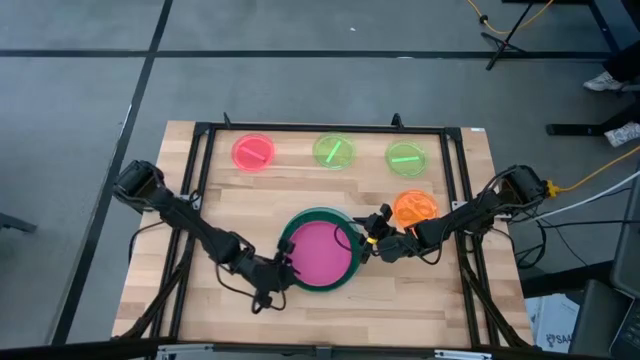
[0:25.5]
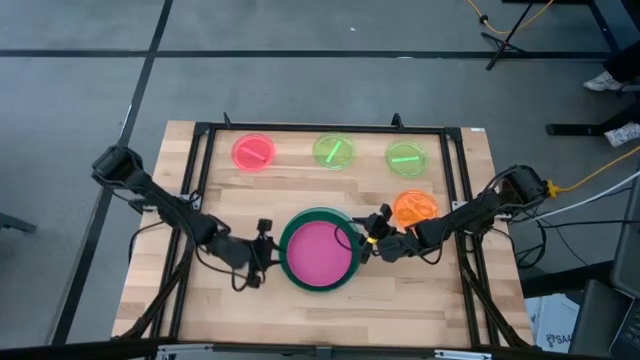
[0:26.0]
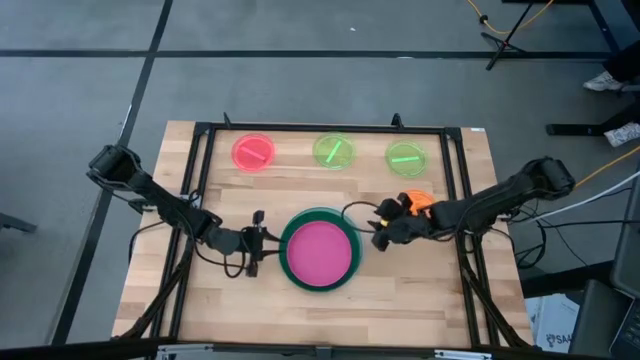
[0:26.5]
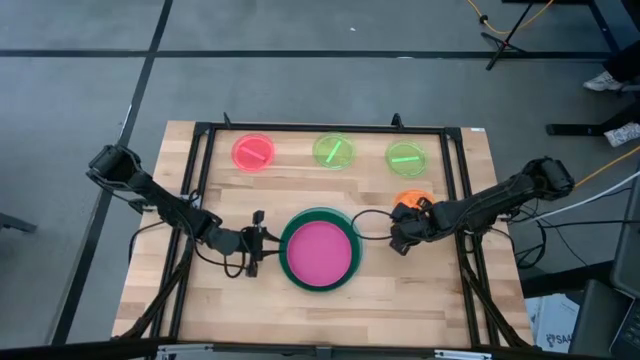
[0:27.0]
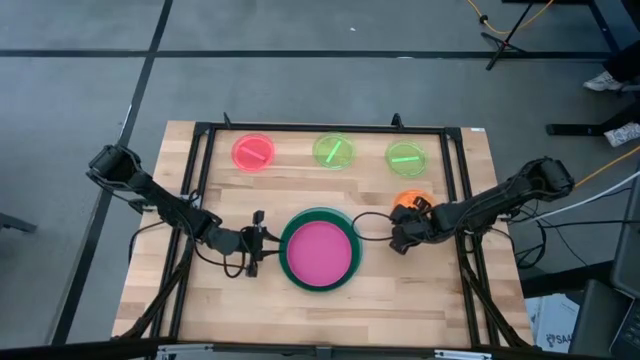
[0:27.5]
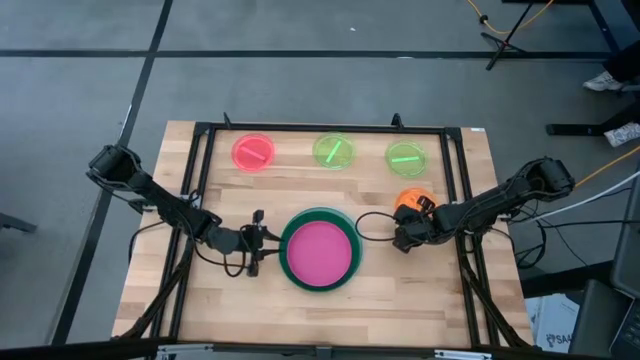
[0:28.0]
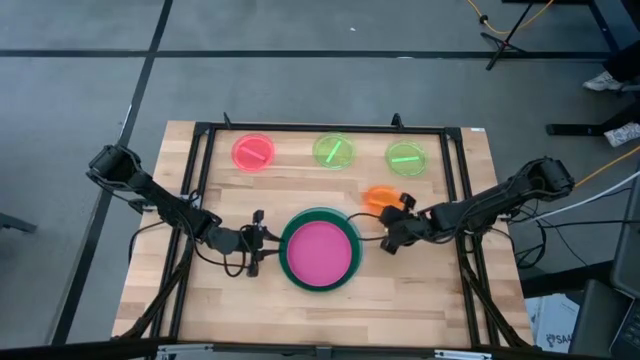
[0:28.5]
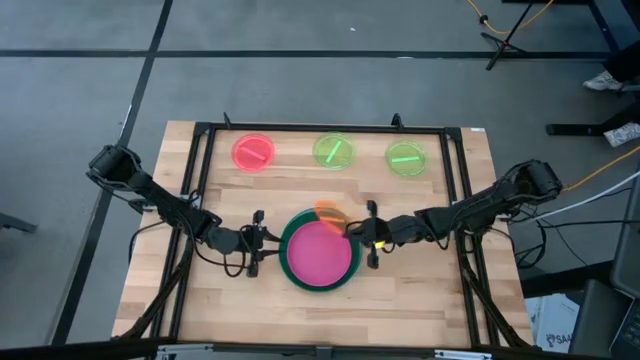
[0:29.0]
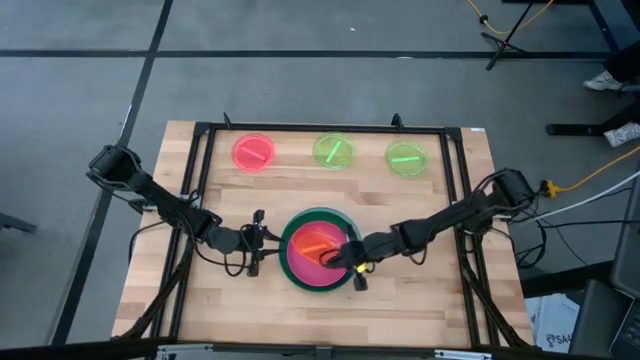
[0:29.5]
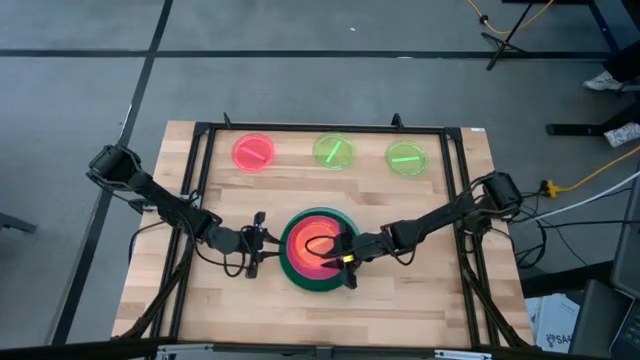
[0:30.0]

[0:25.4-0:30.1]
Task: Stack plastic plates
Stack the orange plate on top of the dark pink plate

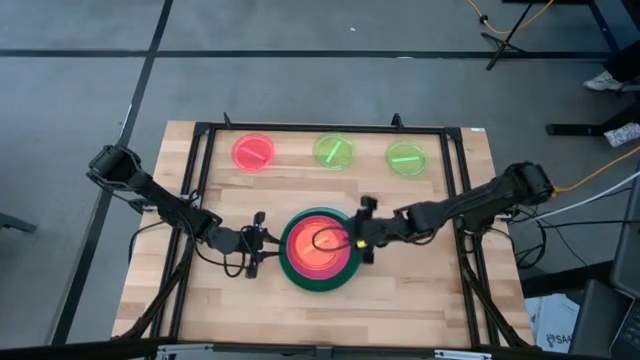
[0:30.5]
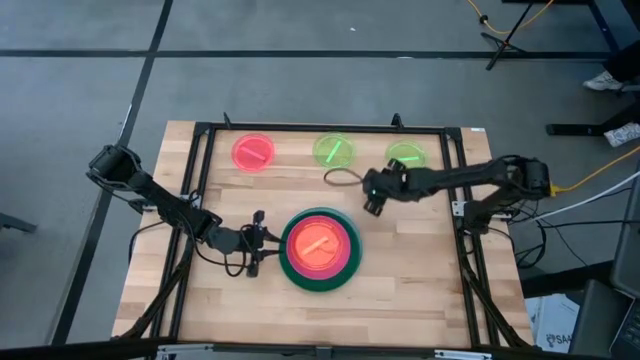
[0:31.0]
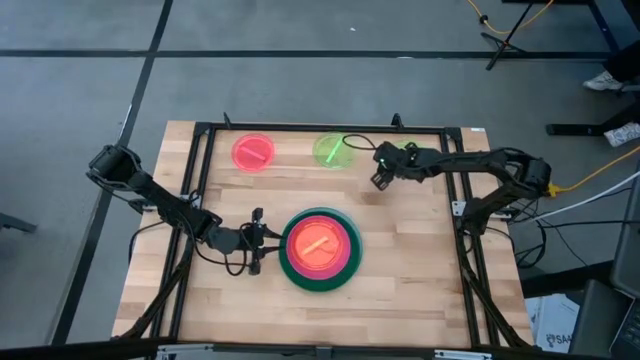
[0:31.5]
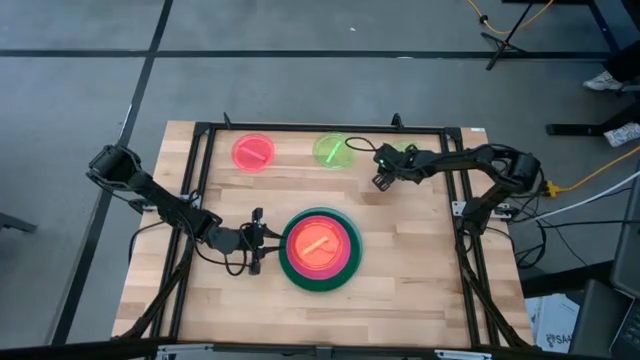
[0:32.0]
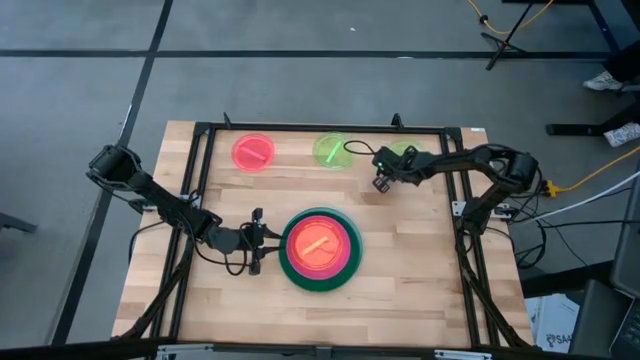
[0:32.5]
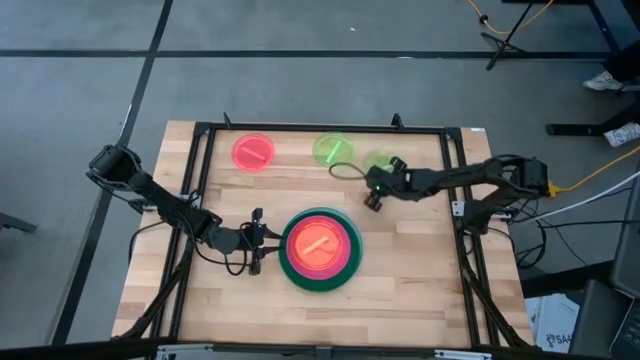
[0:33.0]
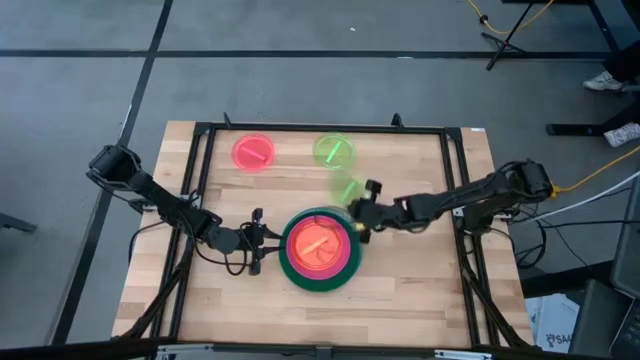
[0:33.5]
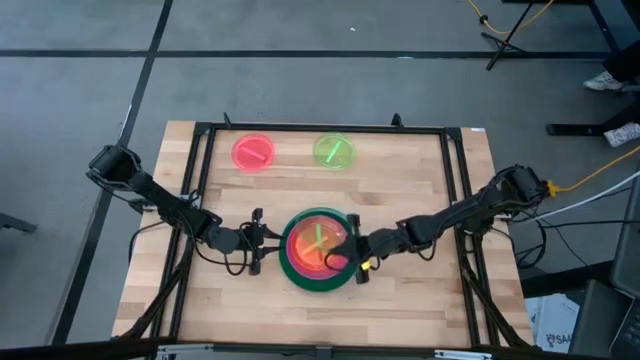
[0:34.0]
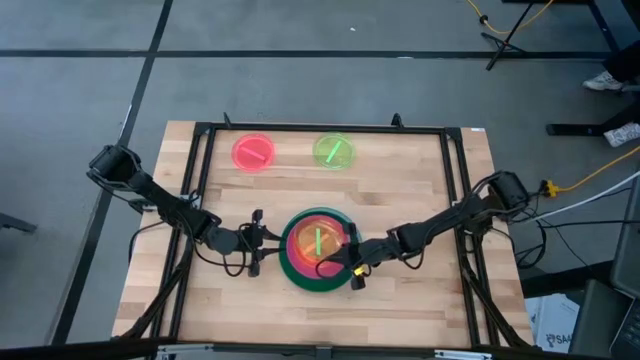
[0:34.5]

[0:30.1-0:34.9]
Stack the right light green plate on top of the orange plate

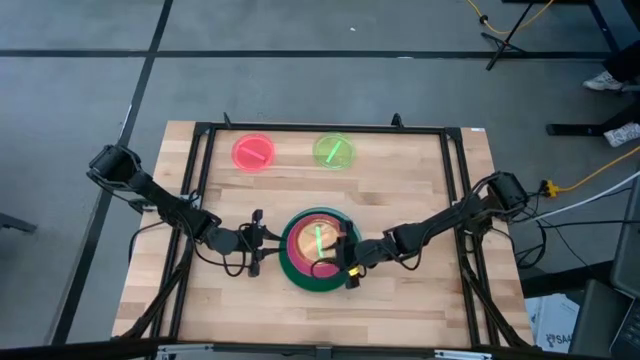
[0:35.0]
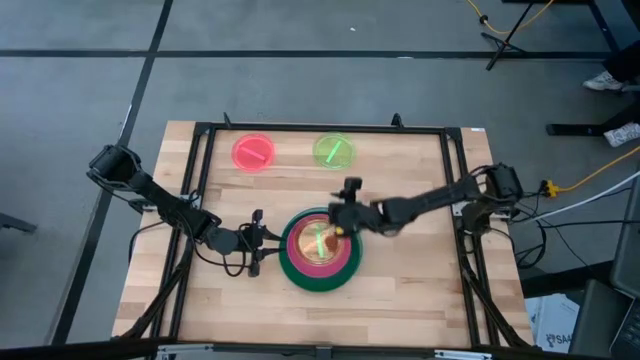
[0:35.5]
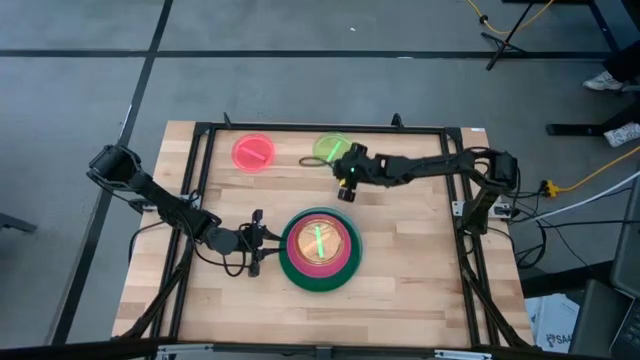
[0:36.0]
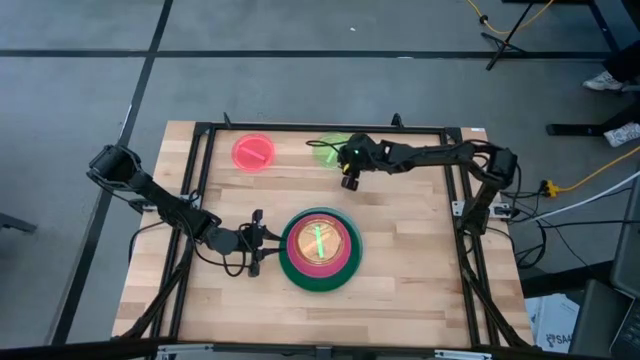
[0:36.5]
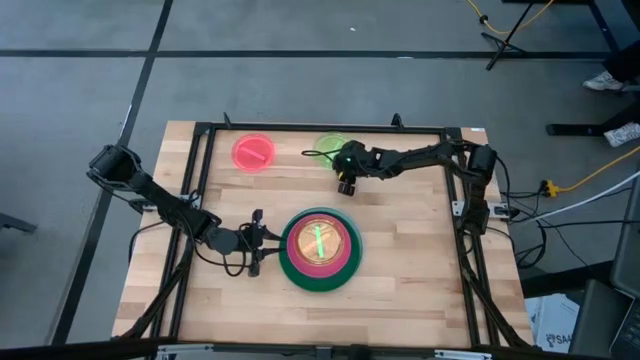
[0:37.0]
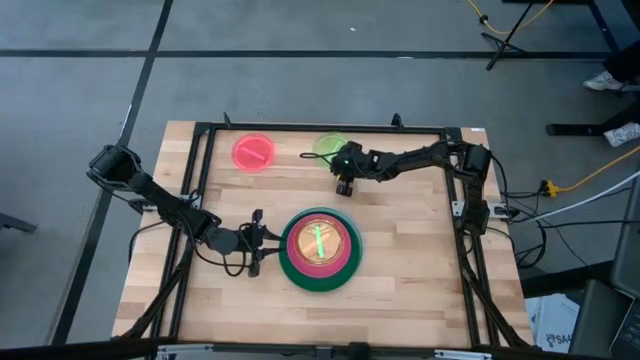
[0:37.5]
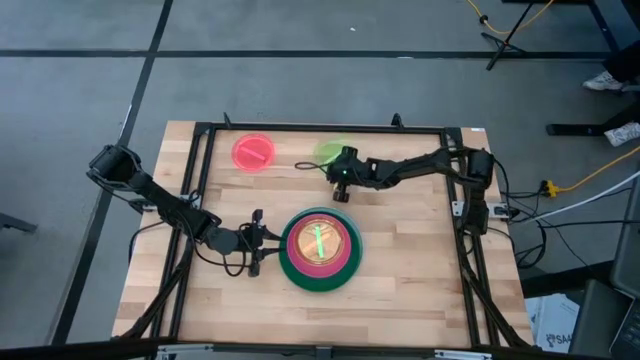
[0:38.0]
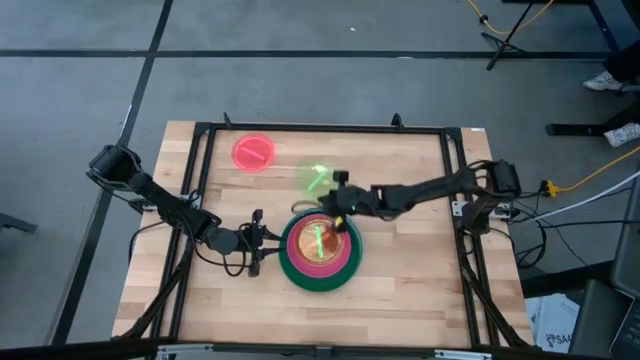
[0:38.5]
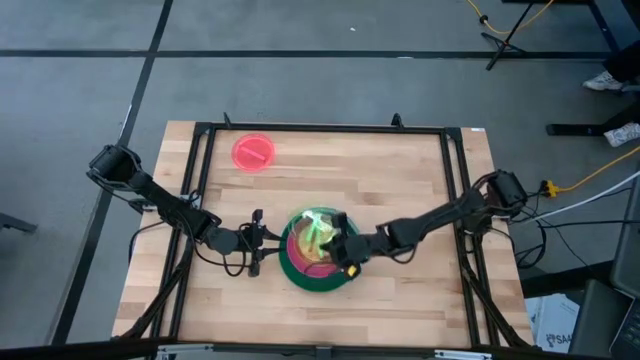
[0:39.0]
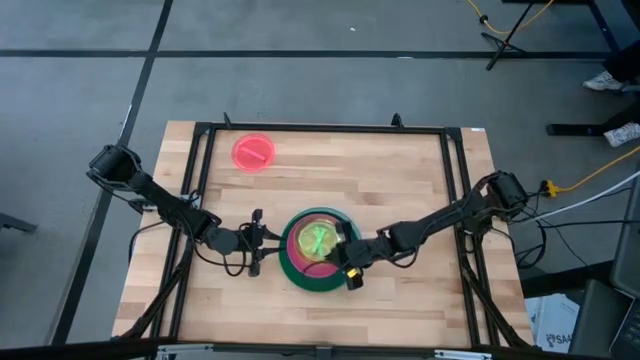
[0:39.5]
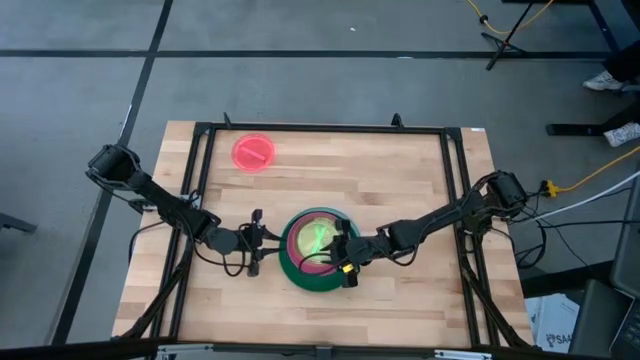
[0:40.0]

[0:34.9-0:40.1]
Stack the light green plate on top of the light green plate

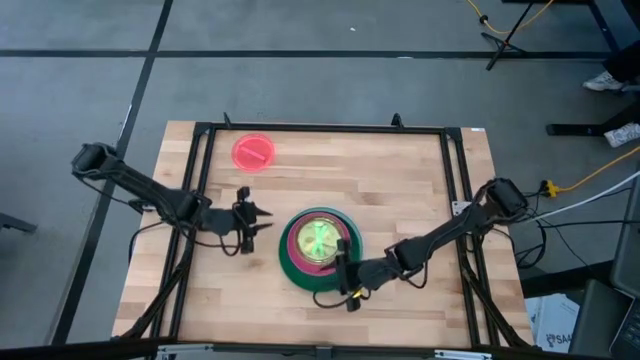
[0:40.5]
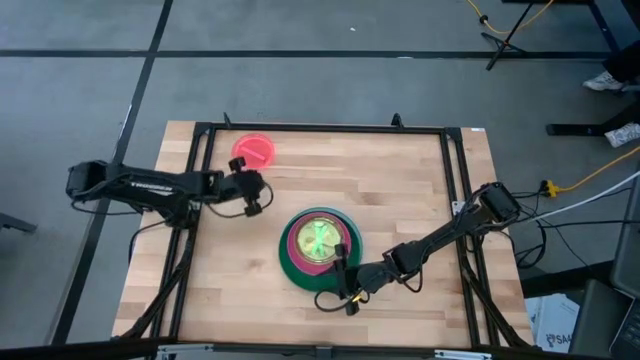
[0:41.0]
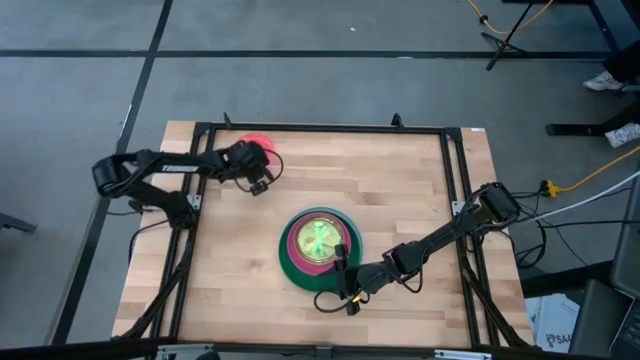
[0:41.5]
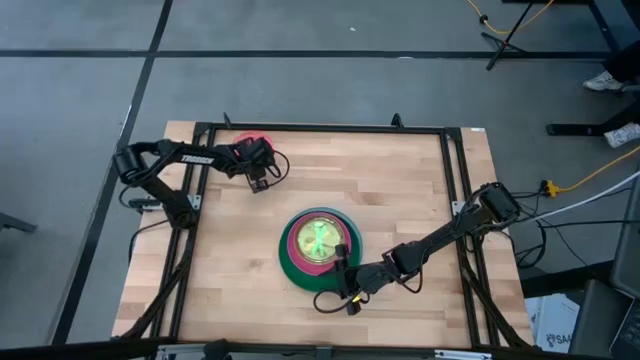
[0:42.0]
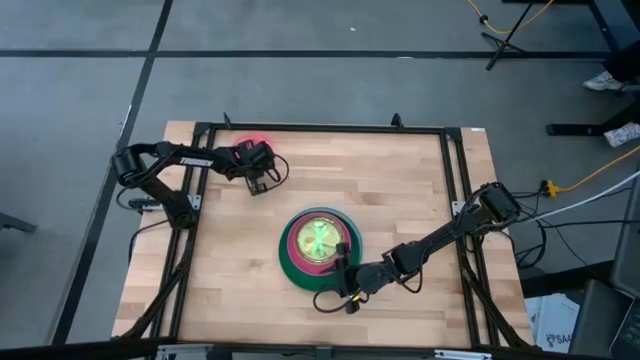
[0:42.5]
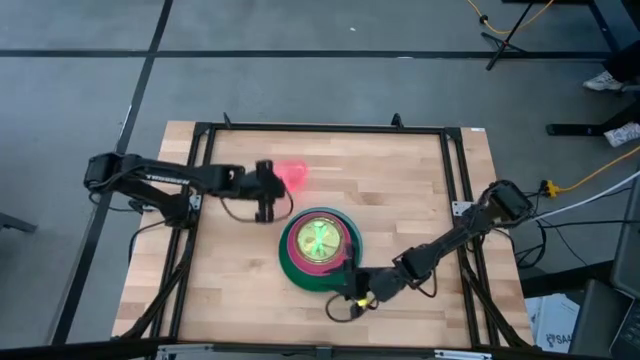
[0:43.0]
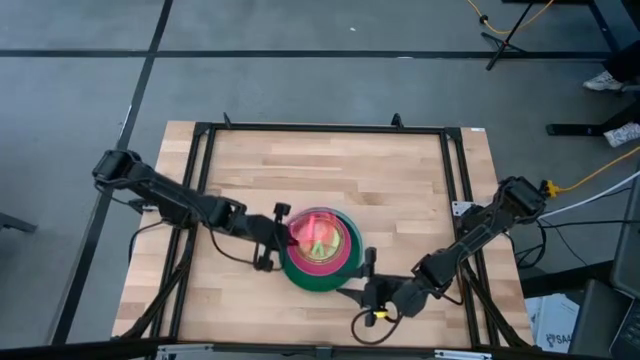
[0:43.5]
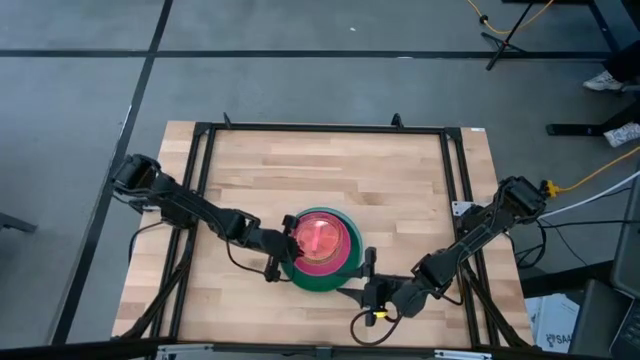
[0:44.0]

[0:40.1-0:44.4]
Stack the pink plate on top of the light green plate

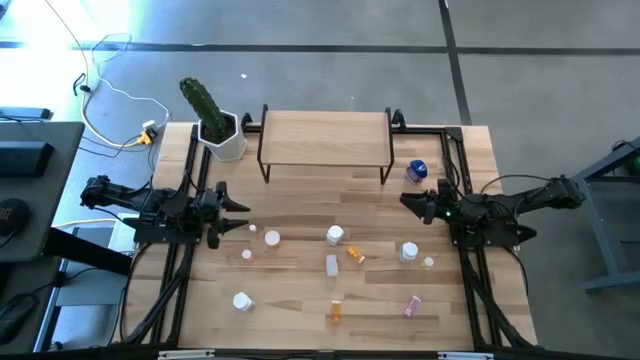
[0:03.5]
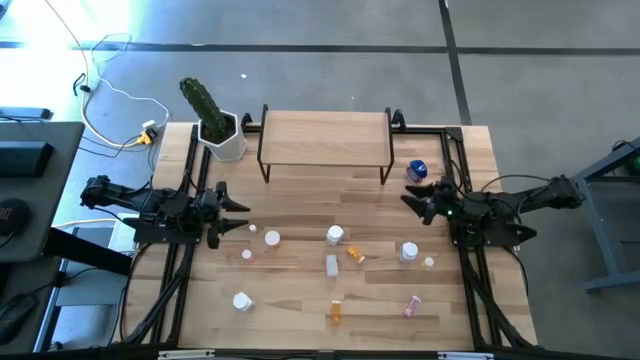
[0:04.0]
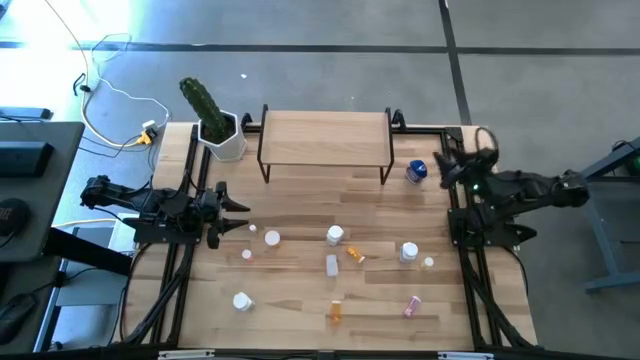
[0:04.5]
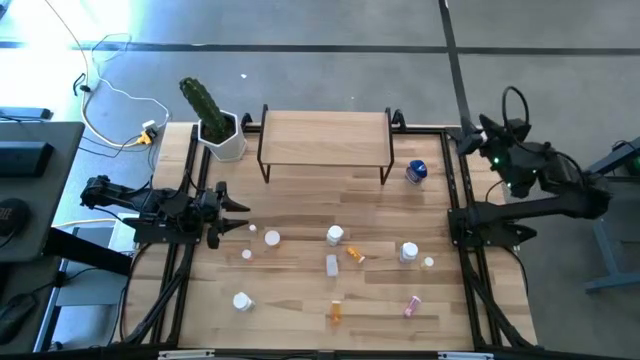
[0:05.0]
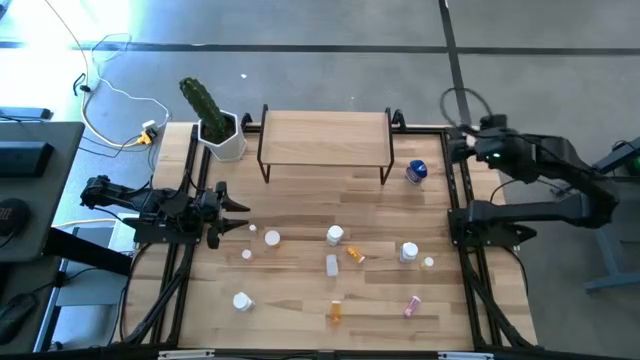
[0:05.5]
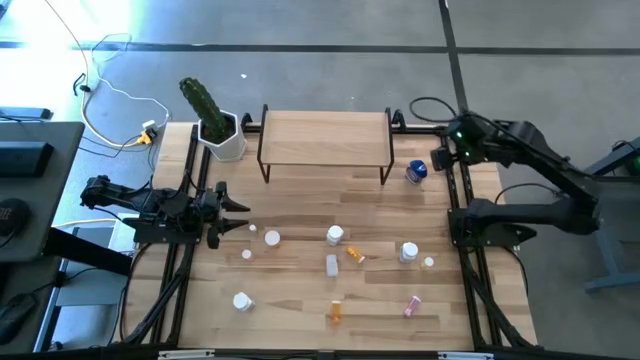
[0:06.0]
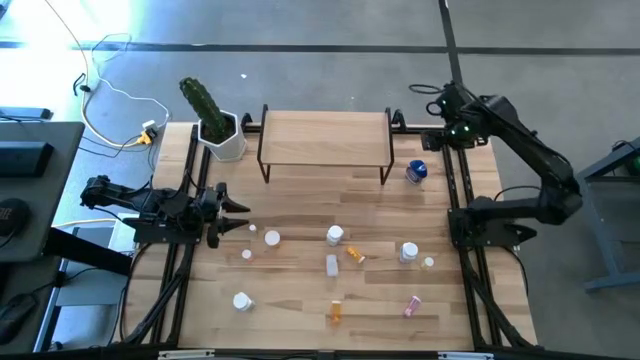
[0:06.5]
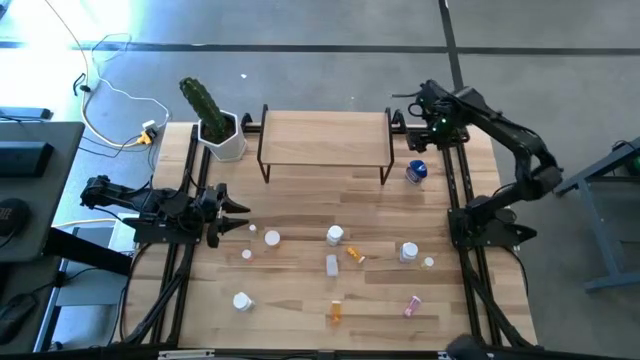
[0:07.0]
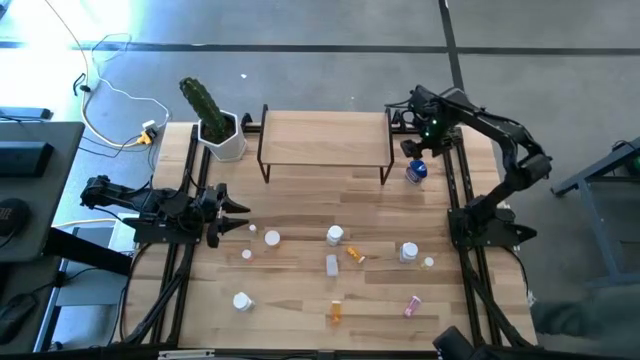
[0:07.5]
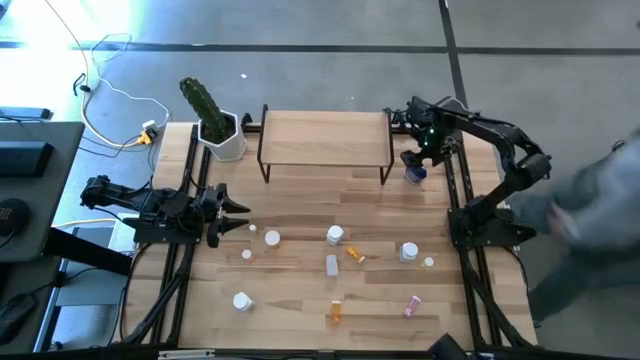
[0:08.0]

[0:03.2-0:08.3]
Task: Pick and place medicine bottles onto shelf by color
Put the dark blue pill bottle on the shelf
